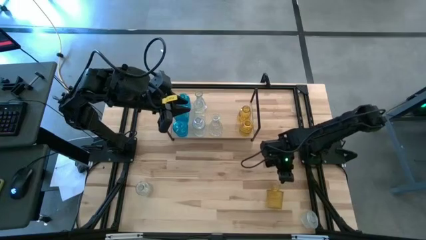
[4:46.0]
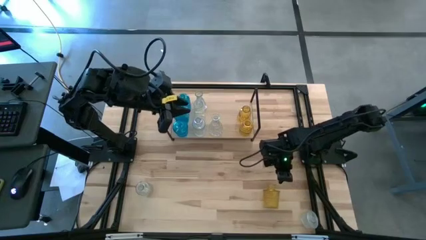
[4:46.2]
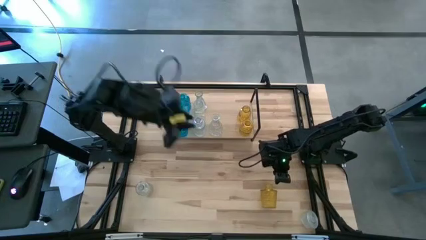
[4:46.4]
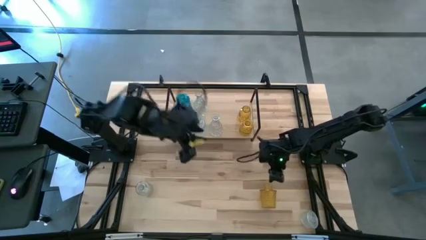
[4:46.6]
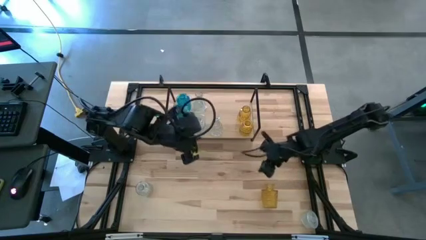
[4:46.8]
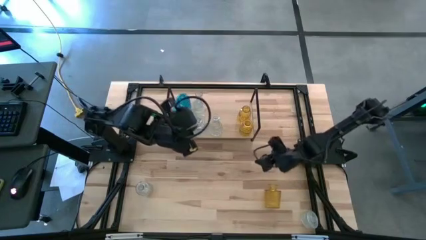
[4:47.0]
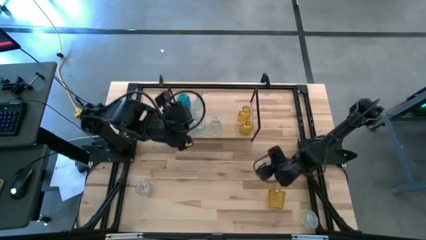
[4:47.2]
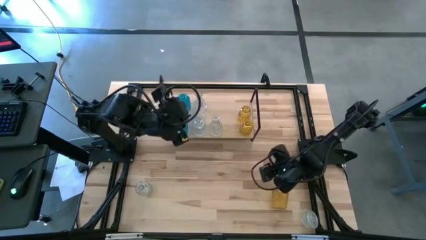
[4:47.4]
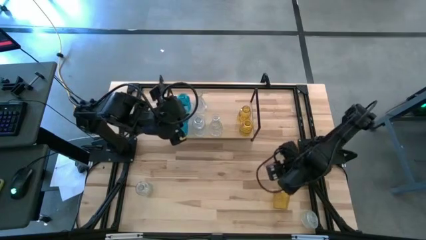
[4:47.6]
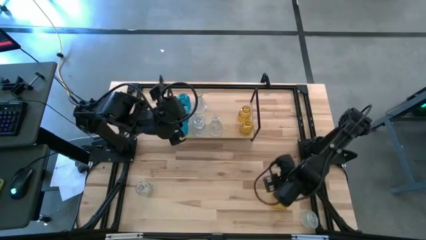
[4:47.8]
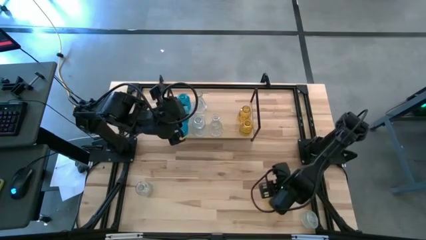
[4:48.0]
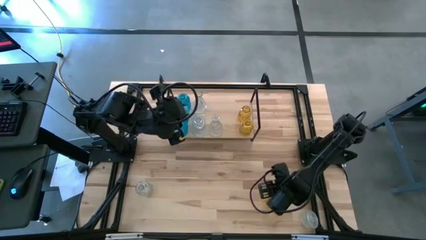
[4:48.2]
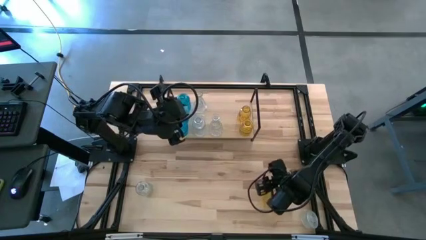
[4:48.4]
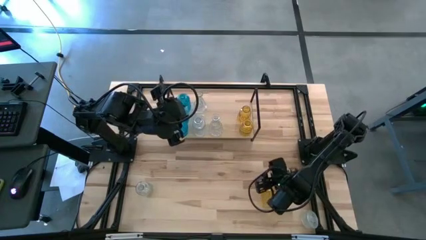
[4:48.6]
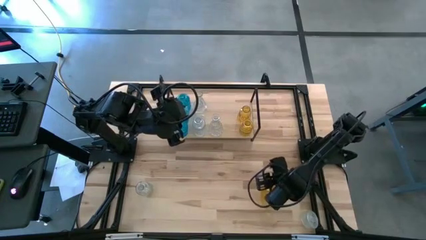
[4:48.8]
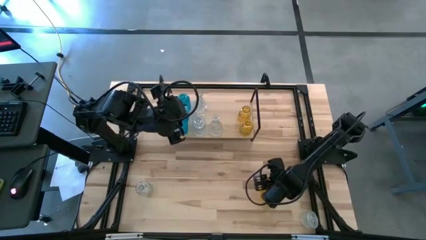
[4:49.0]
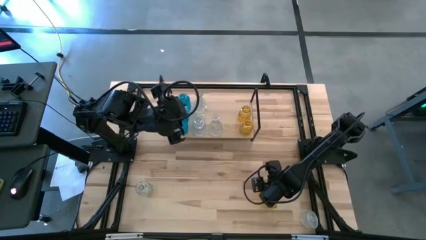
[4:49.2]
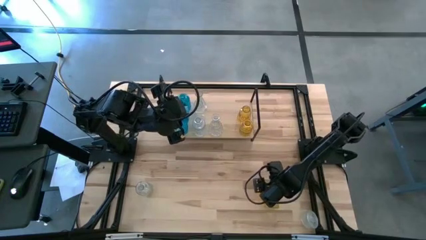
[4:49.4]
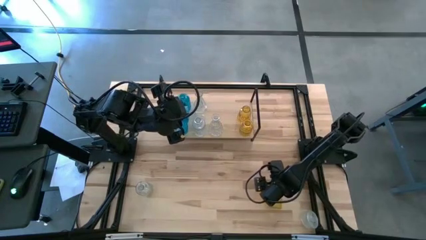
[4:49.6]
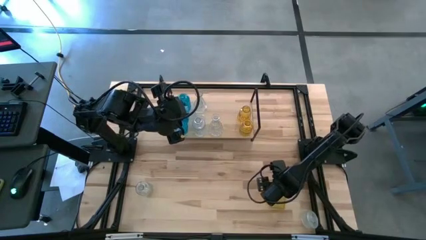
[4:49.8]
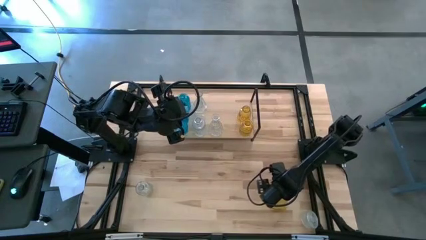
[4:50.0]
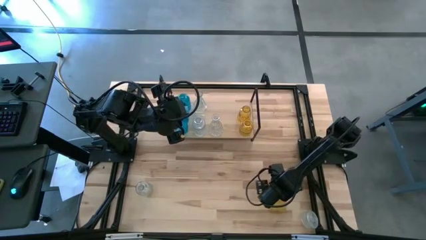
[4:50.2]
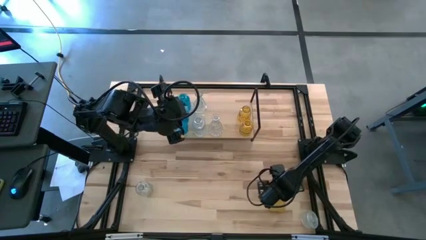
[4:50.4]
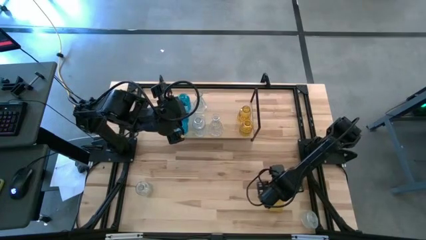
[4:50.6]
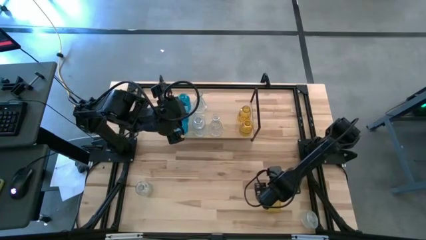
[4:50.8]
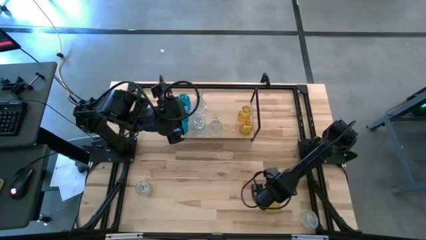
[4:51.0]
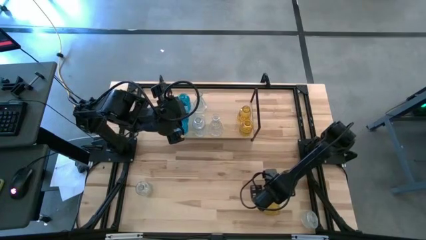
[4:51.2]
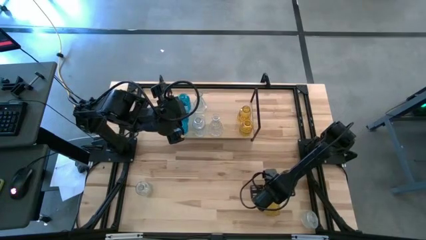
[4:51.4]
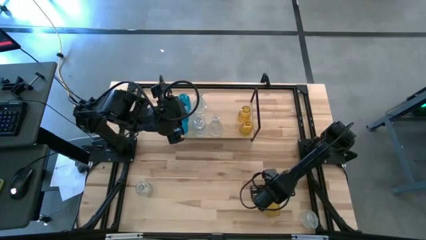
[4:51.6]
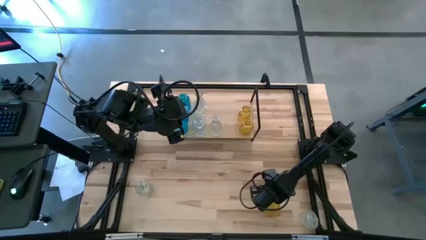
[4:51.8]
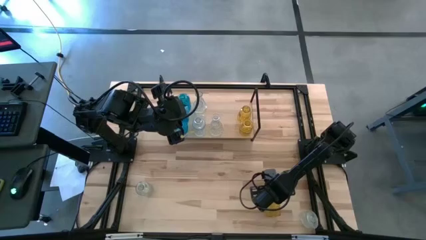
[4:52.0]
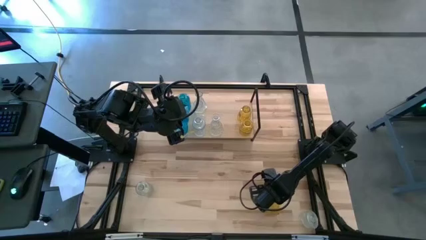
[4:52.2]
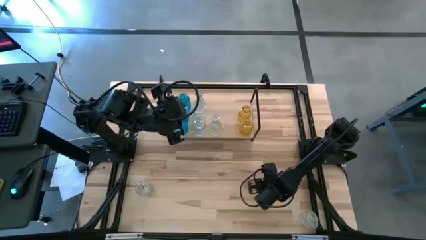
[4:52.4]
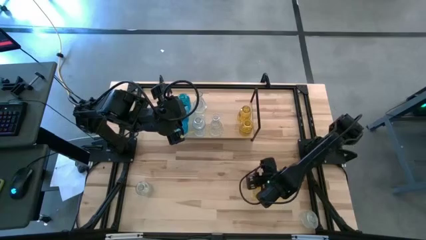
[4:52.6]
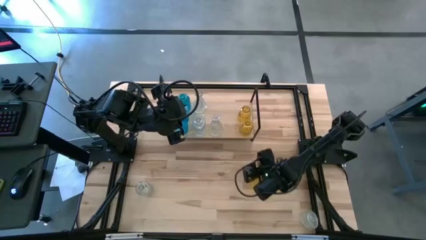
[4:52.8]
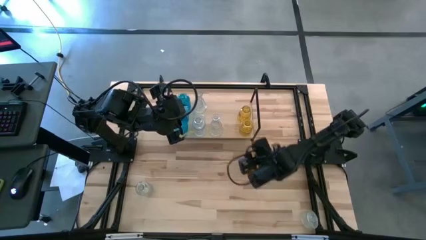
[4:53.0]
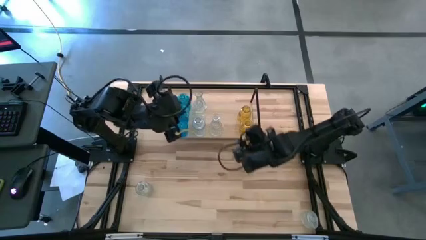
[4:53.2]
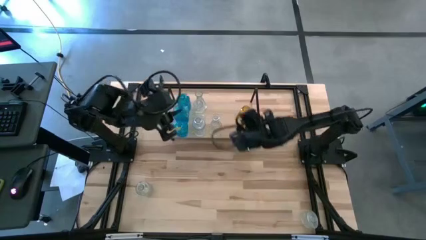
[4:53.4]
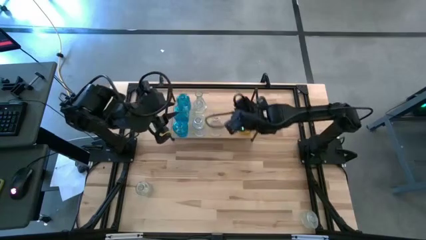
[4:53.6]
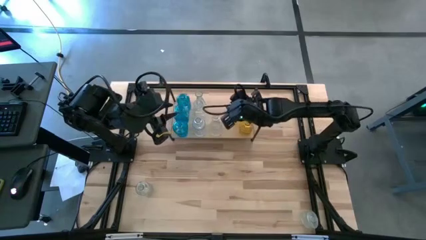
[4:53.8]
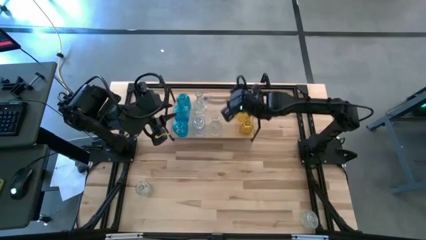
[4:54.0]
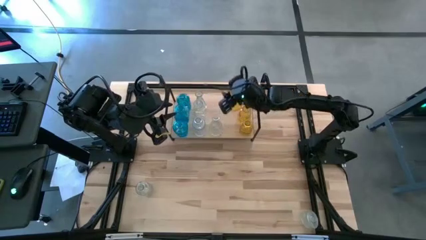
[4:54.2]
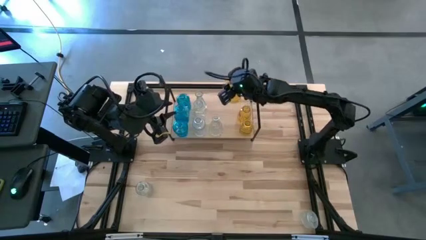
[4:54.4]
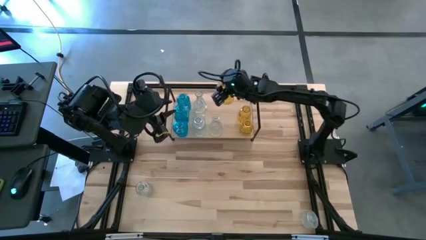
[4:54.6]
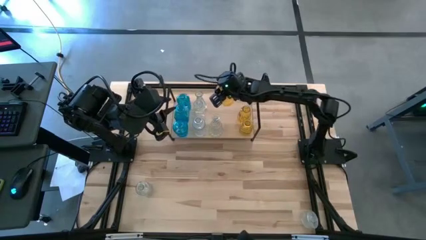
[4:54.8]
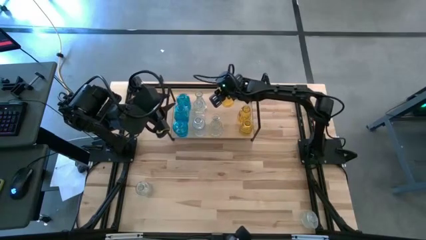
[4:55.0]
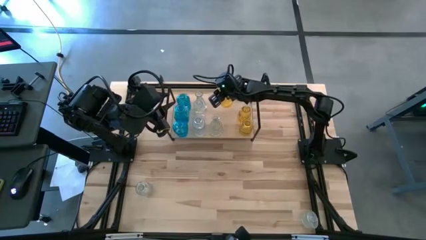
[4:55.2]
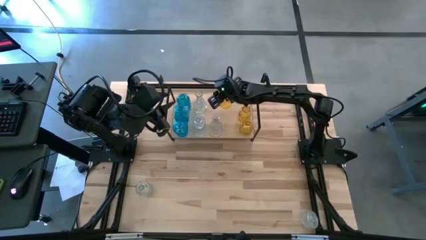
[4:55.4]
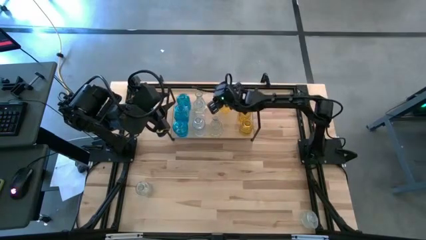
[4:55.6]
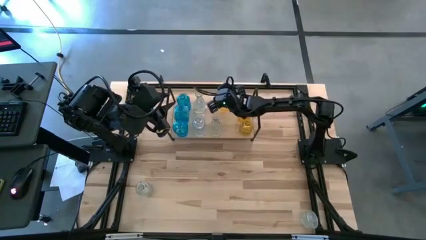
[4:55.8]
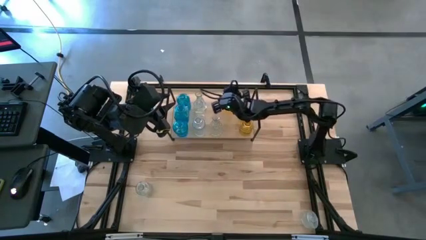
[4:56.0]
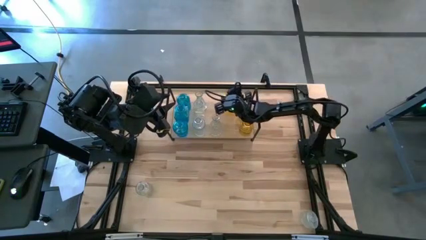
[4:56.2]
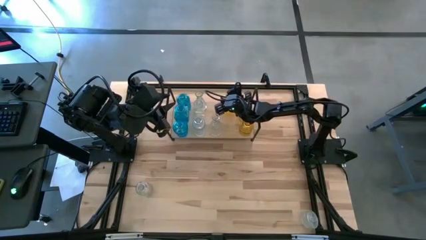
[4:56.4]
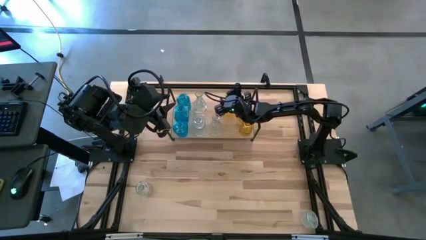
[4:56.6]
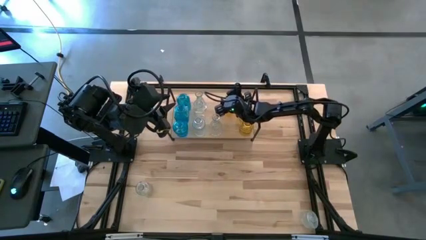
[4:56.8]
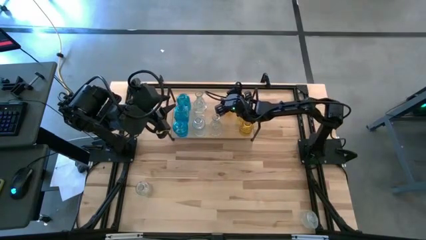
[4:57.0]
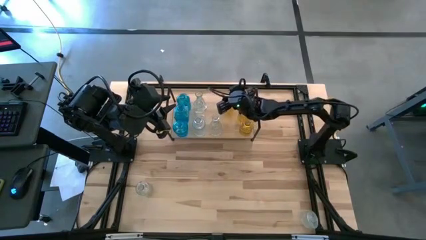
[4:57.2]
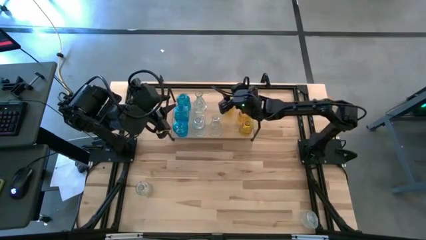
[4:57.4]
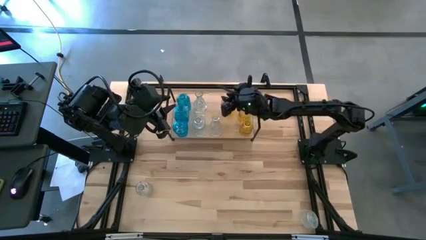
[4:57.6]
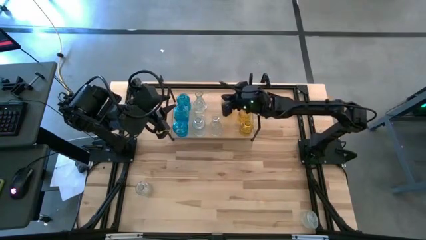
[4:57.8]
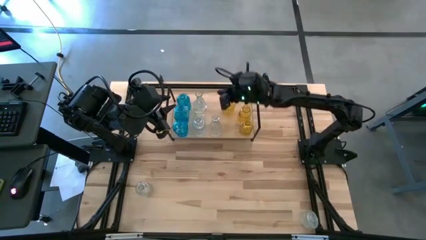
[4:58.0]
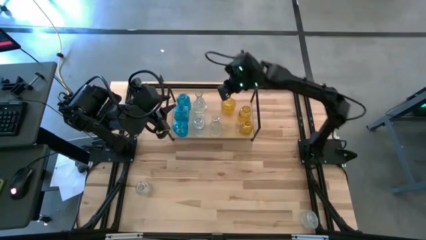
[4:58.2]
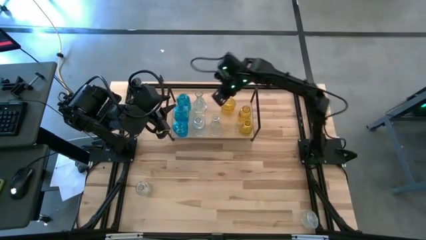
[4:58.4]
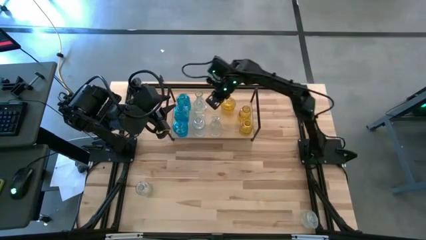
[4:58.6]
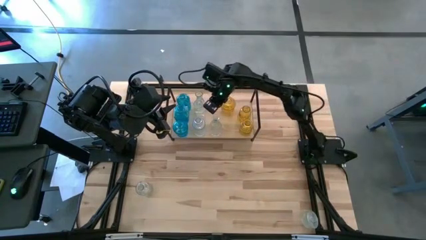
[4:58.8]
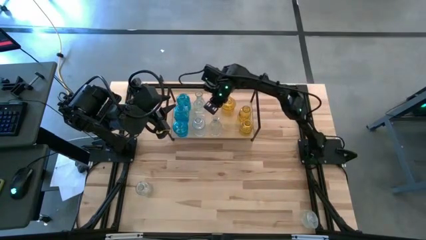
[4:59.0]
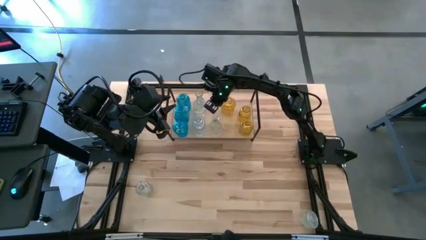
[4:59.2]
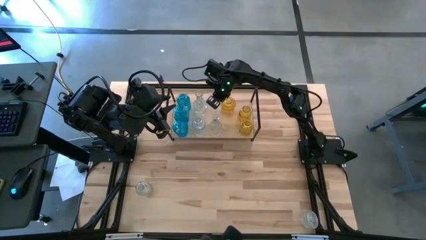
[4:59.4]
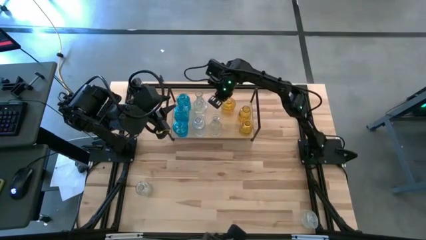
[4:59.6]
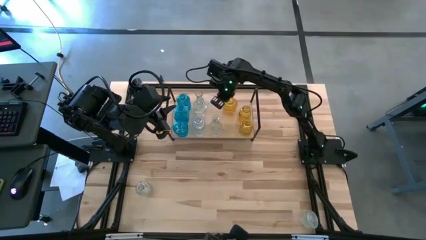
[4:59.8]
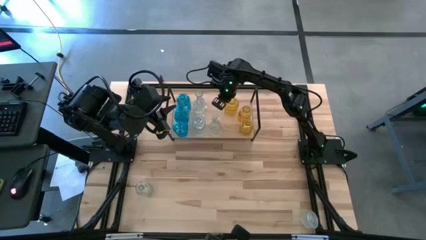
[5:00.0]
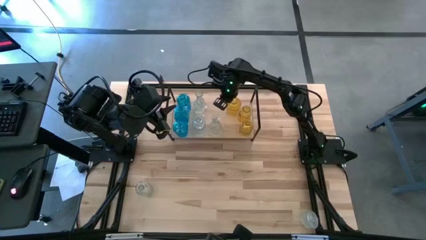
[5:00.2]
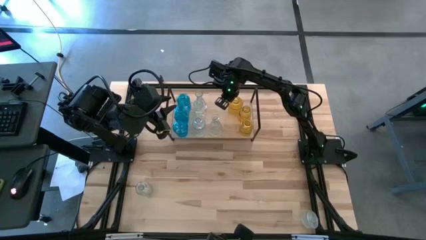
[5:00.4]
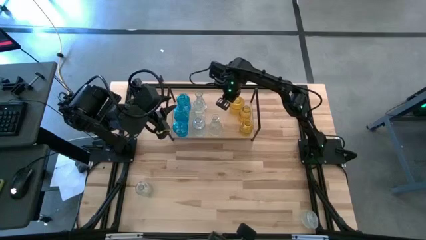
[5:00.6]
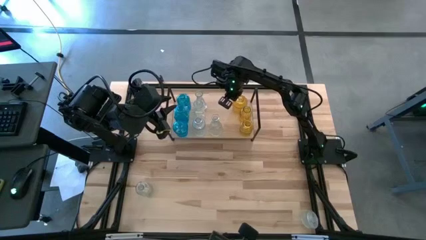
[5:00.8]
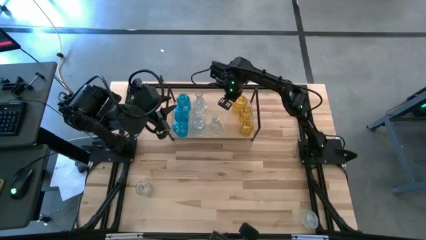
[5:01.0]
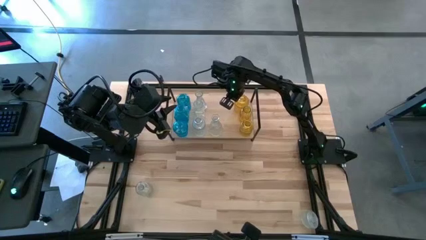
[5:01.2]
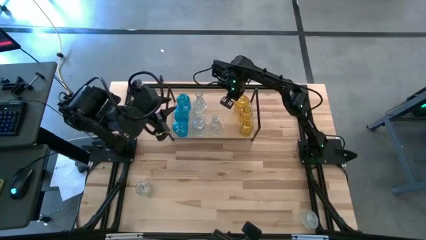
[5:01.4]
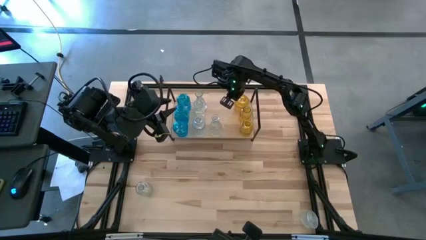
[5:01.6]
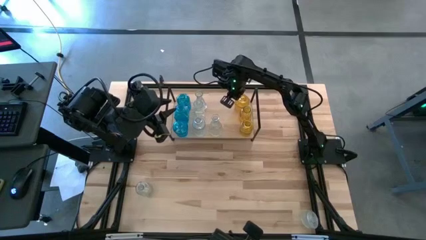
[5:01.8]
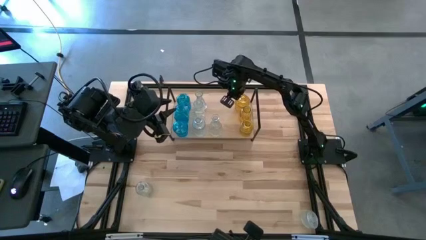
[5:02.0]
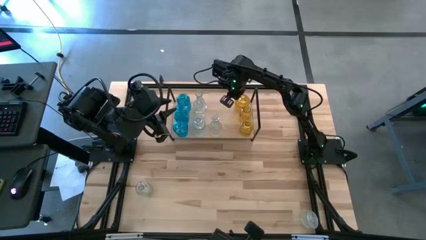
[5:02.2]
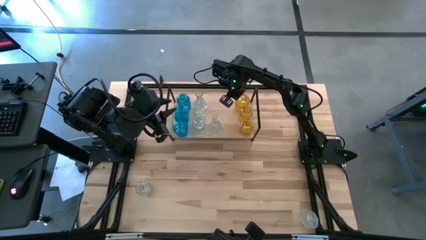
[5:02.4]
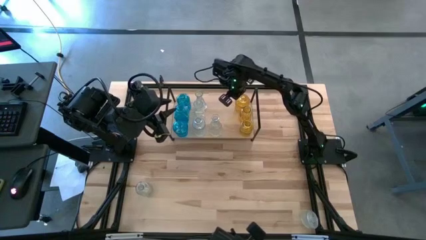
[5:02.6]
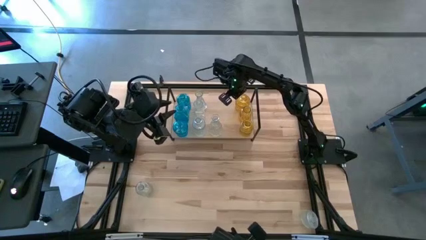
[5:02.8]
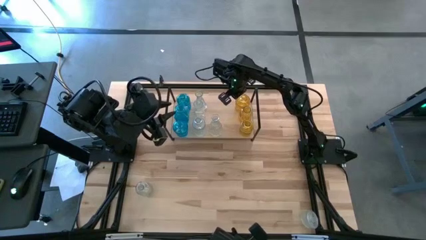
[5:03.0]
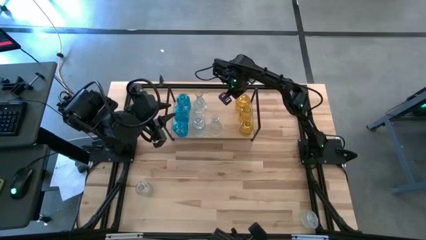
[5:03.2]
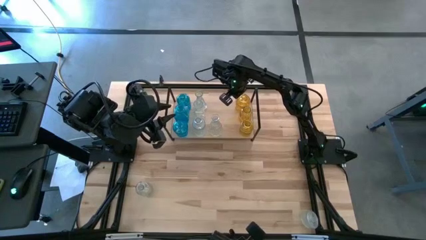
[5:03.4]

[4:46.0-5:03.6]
Task: sort vases onto shelf
Put the yellow vase on the shelf aligned with the other yellow vases
